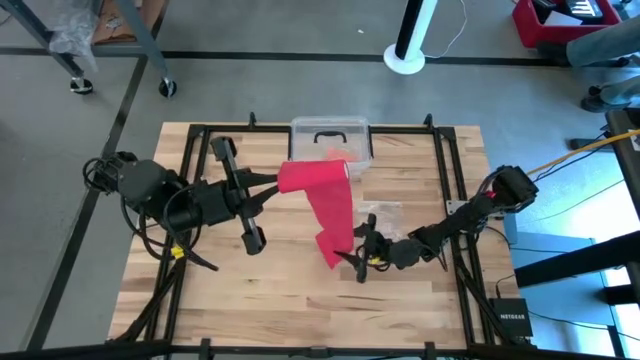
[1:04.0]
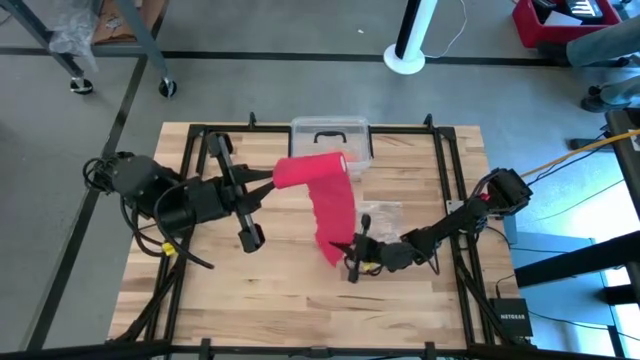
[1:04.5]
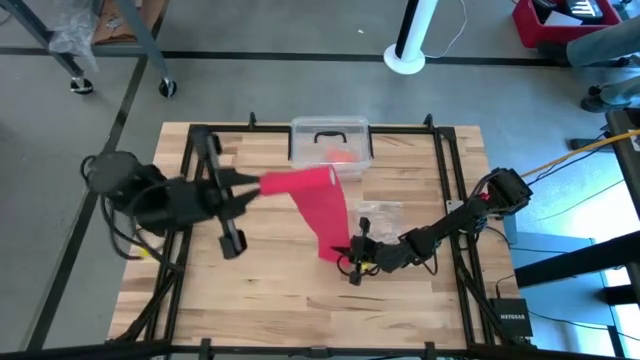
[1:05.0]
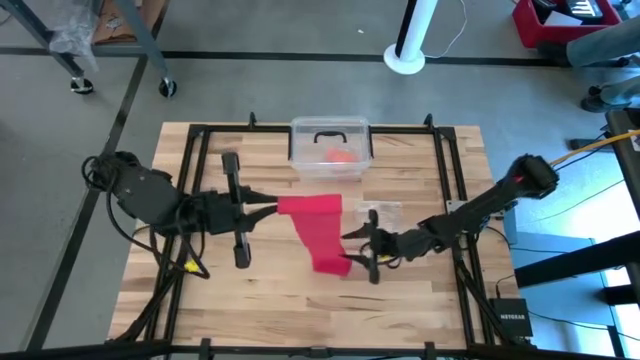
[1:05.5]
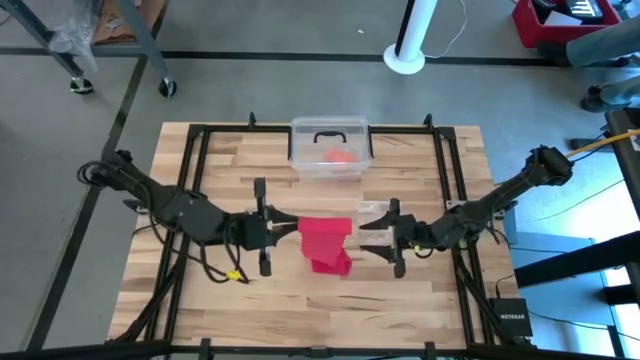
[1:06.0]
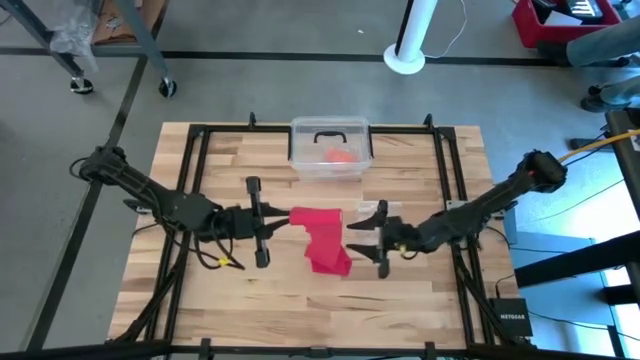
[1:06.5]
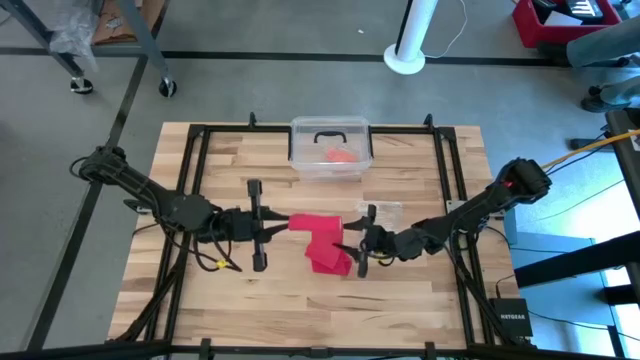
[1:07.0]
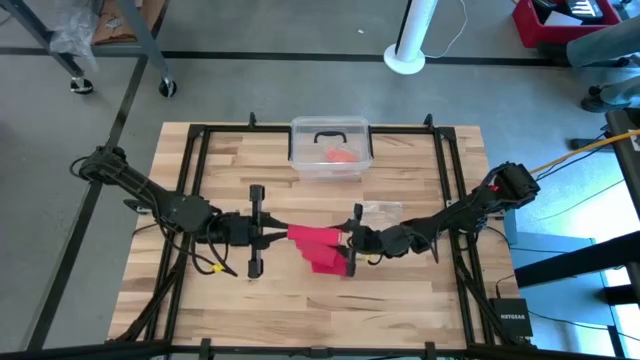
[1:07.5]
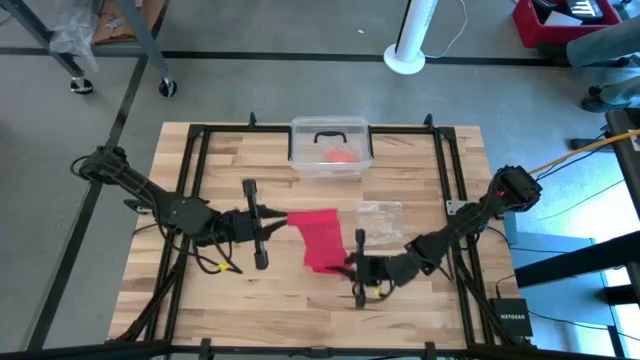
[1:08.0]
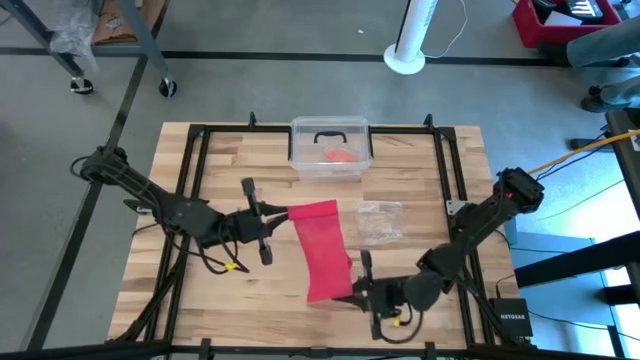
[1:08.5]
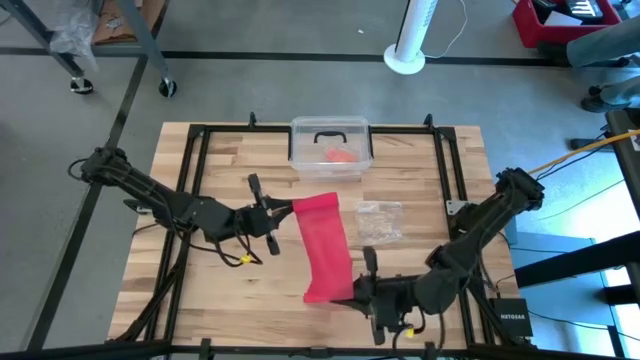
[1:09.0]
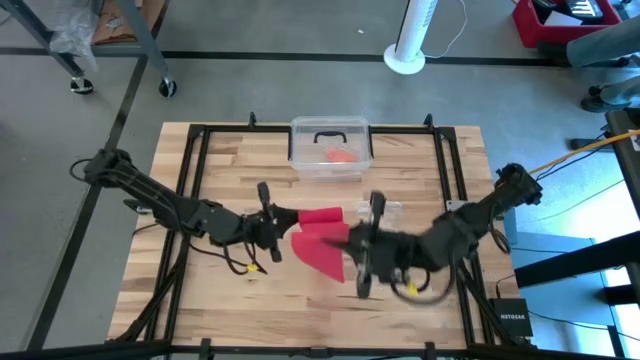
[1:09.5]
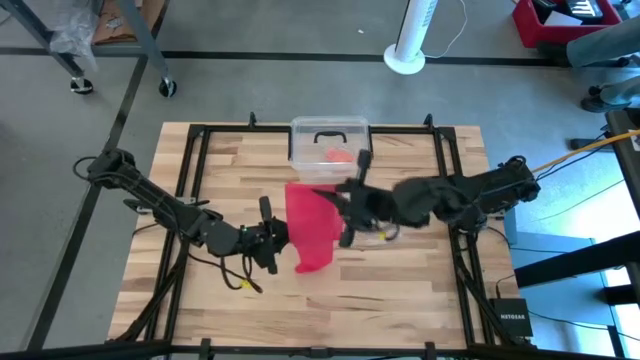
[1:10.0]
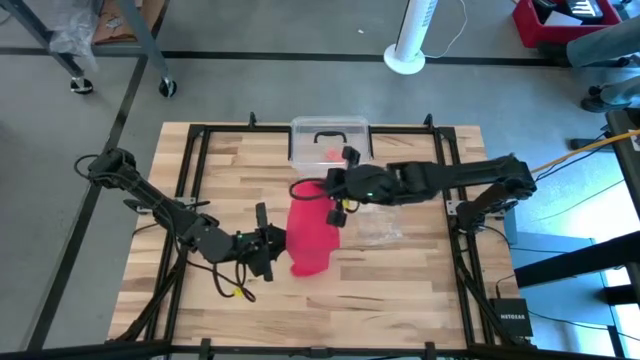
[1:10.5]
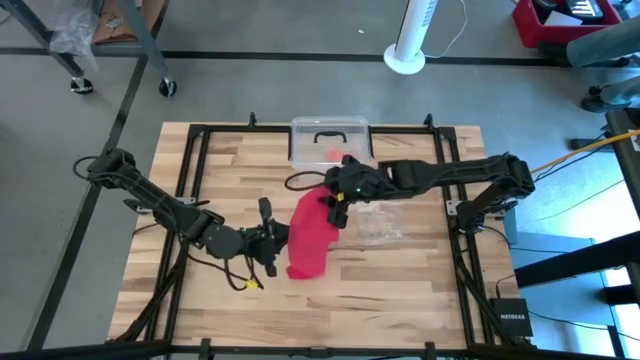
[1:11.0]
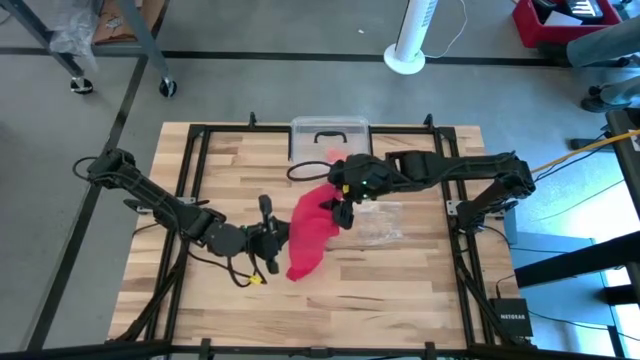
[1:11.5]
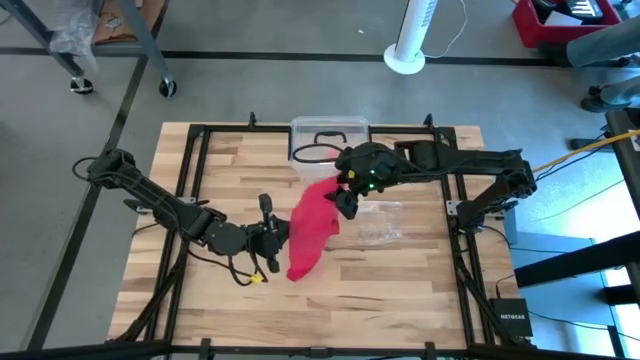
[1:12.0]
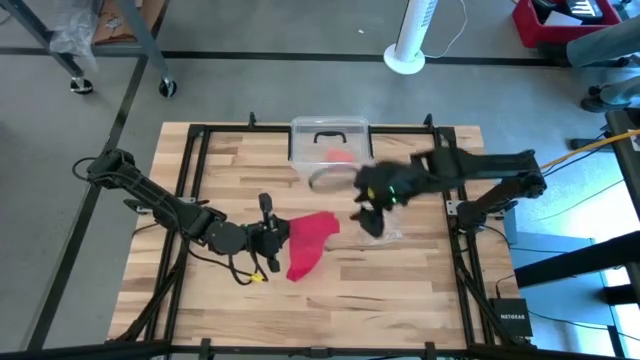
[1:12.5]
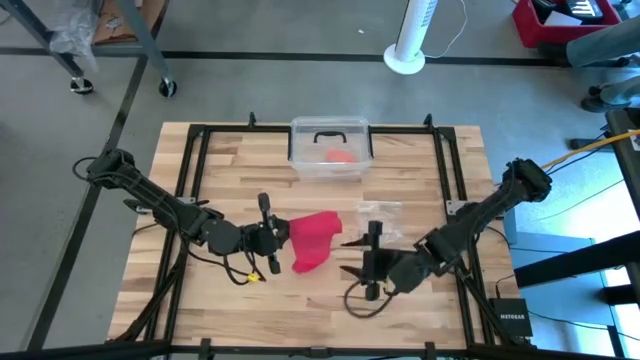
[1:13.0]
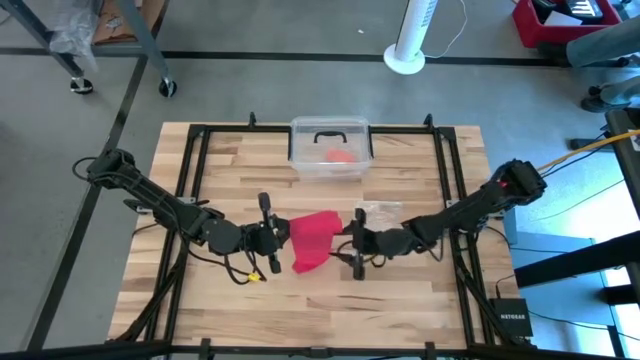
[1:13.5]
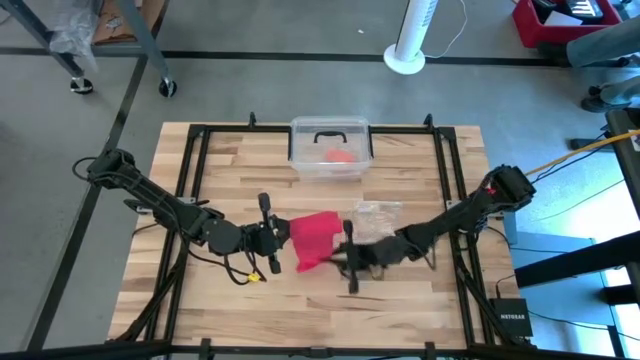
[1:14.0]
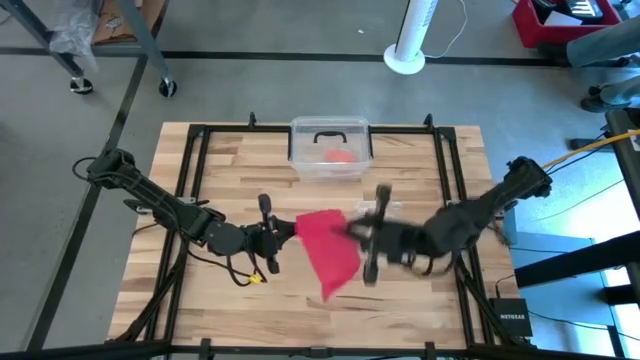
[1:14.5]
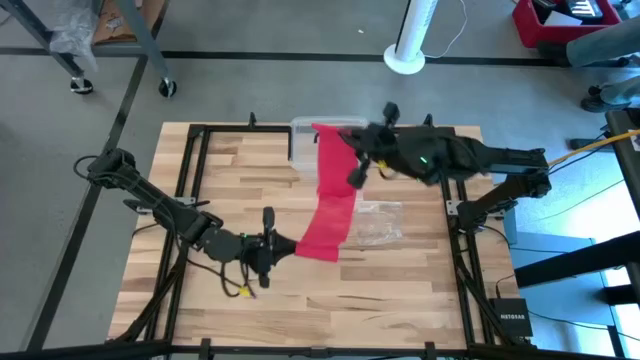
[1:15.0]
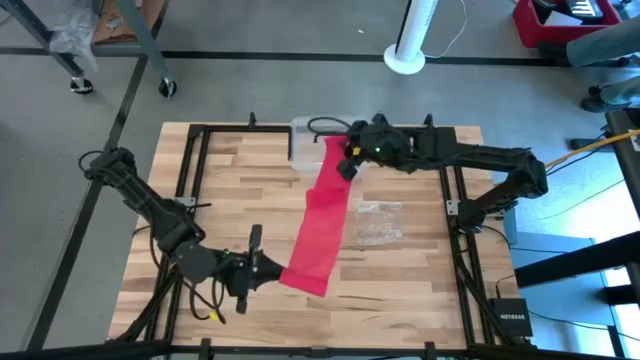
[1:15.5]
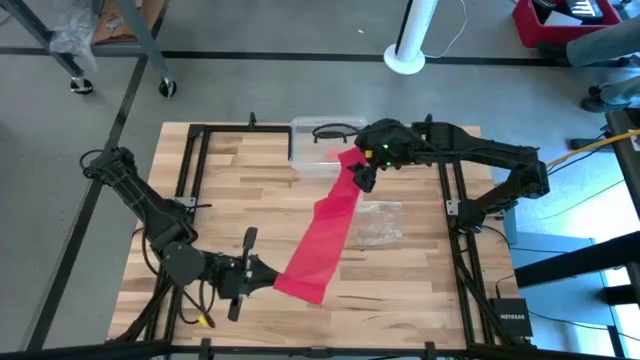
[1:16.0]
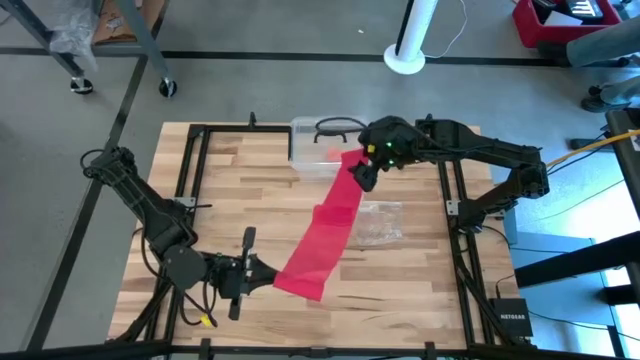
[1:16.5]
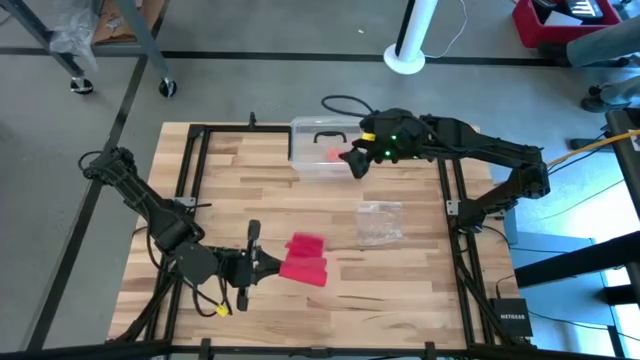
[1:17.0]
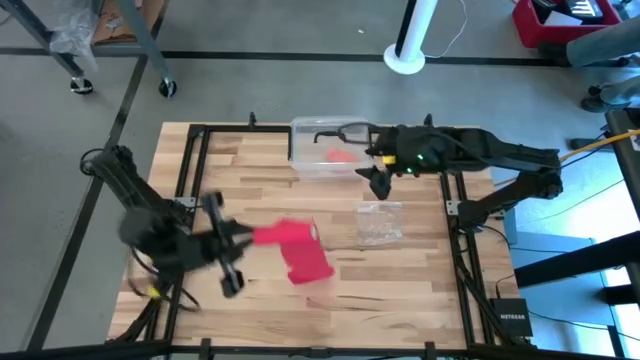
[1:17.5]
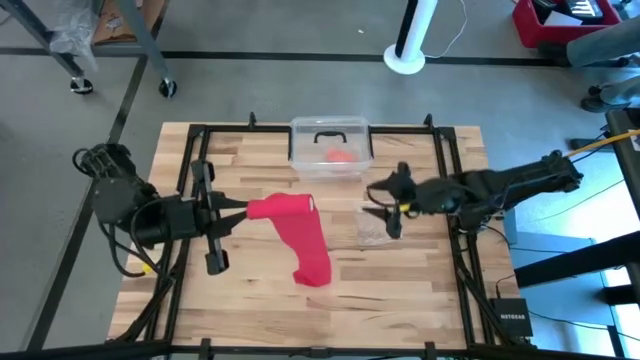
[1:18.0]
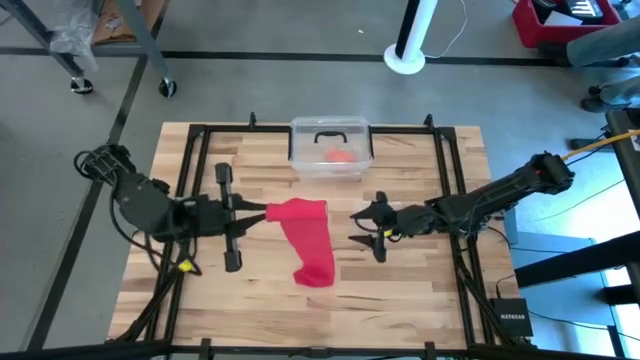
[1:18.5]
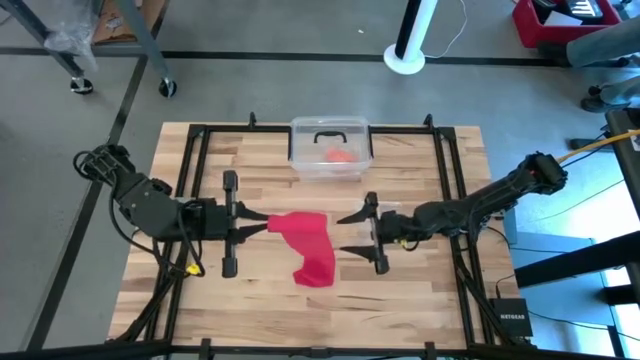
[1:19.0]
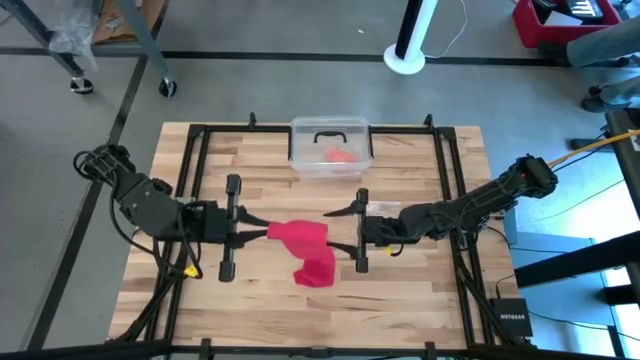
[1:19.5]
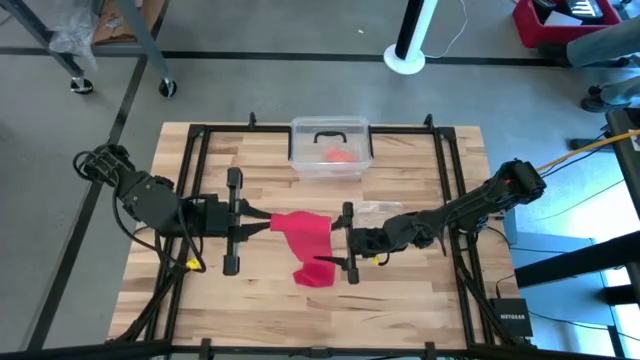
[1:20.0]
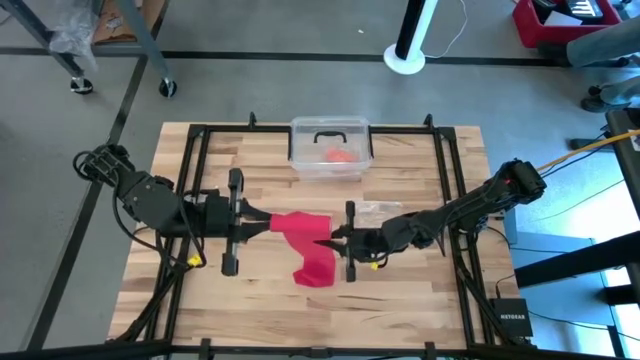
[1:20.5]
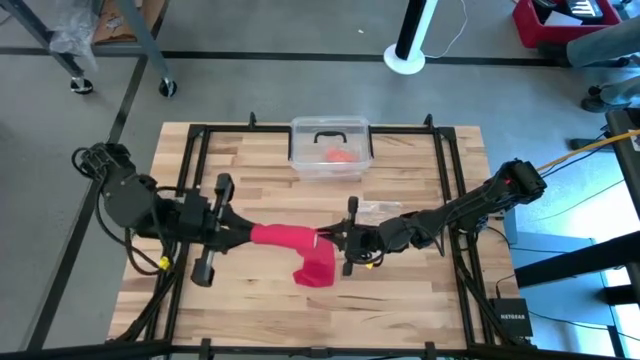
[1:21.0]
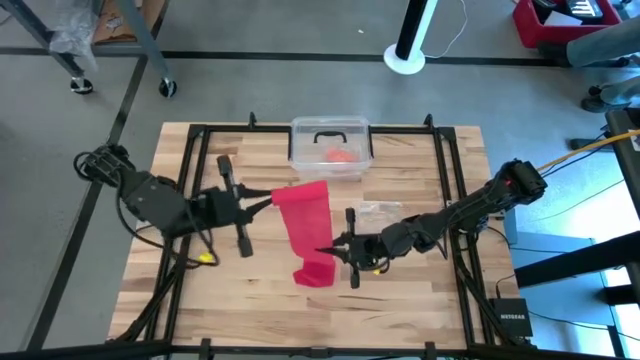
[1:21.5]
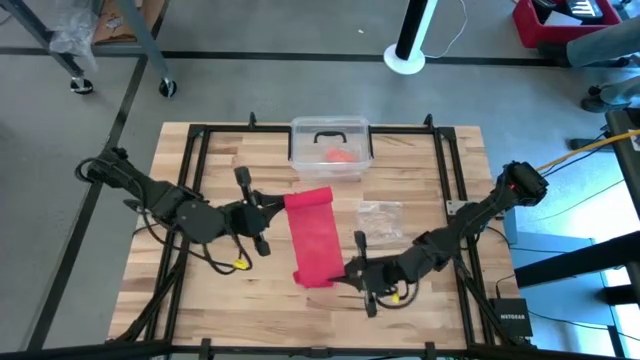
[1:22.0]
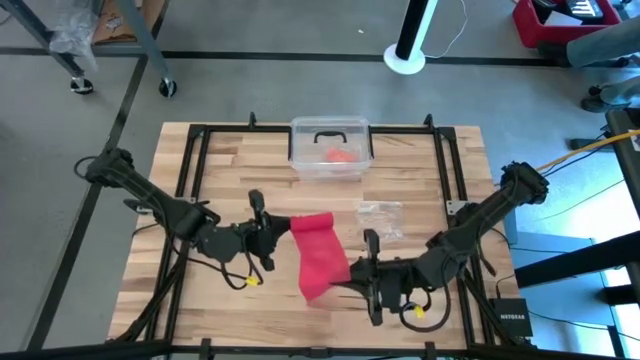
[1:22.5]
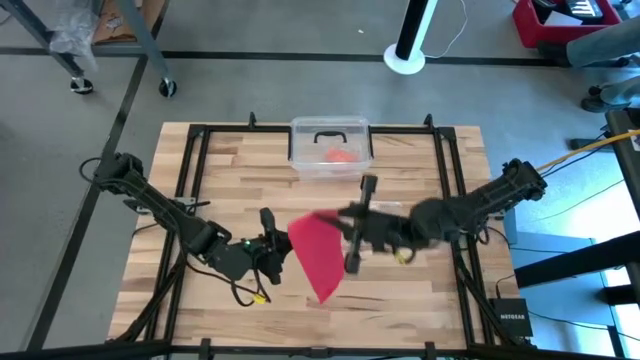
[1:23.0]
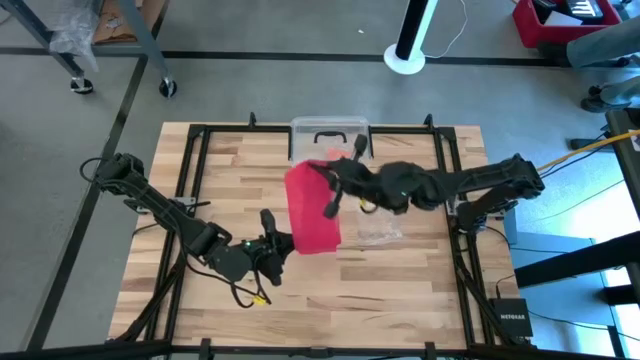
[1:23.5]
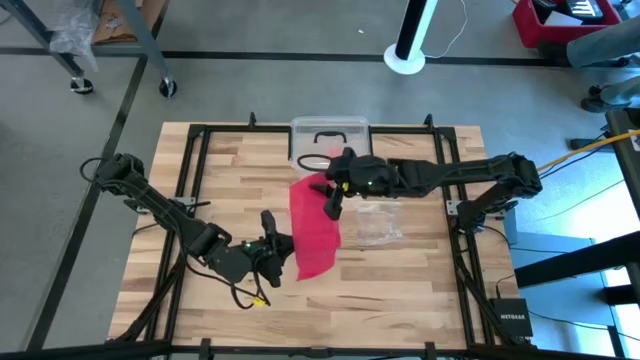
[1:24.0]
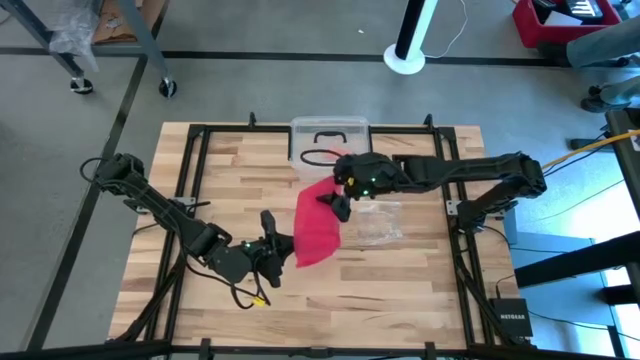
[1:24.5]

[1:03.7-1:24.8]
Task: Roll bandage
Roll the red bandage

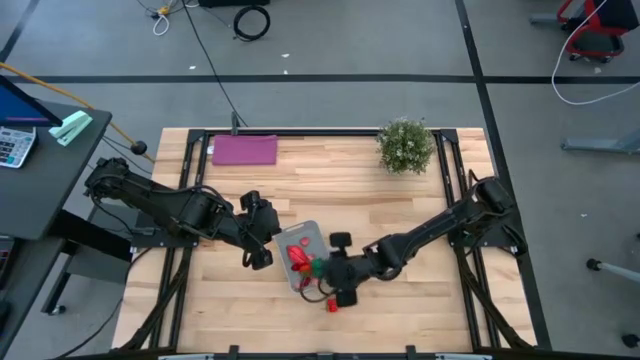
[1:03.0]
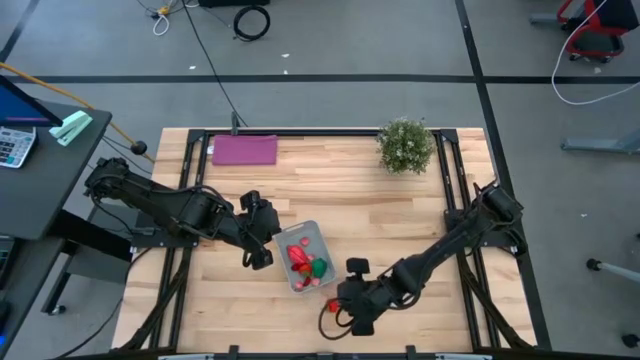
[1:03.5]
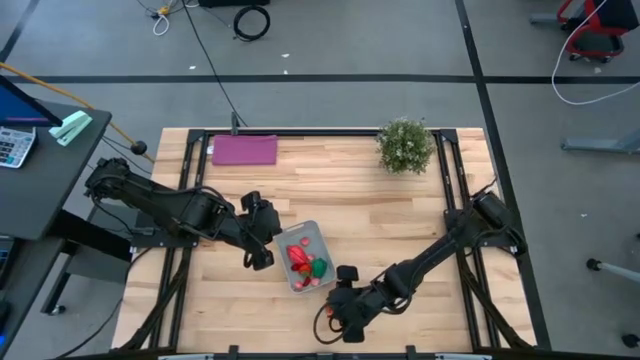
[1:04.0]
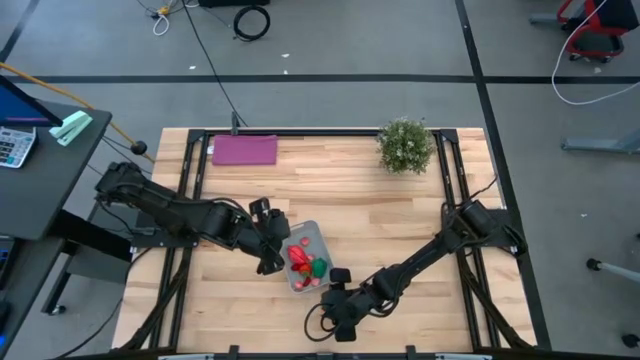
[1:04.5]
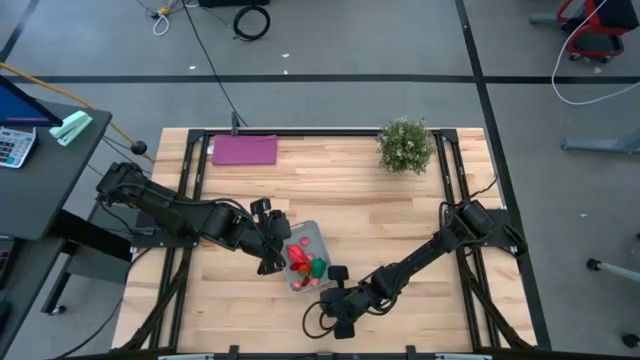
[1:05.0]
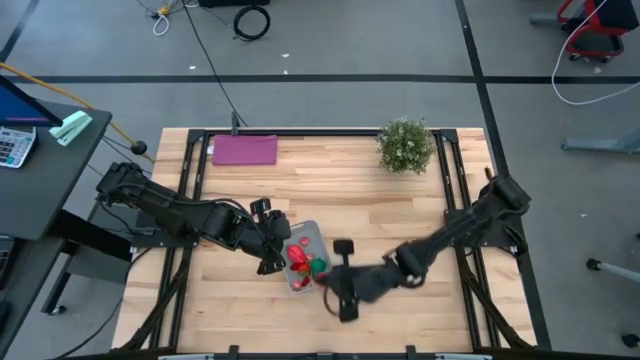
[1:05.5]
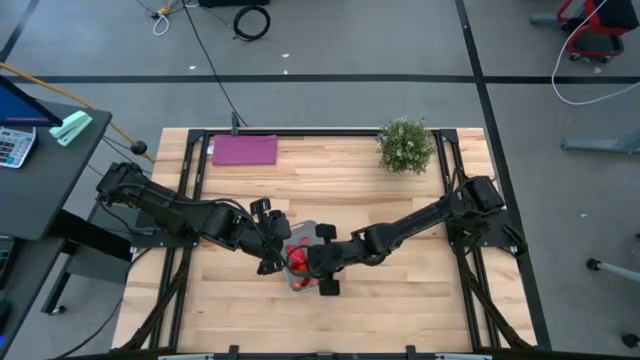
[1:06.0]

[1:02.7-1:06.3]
Task: Pick and placing Produce into tupperware
Put the red strawberry into the gray bin
